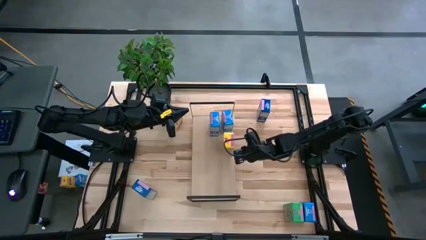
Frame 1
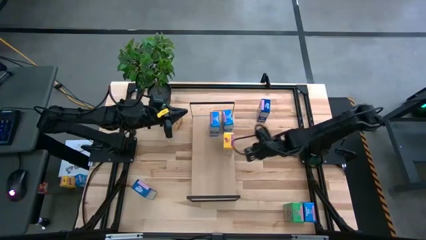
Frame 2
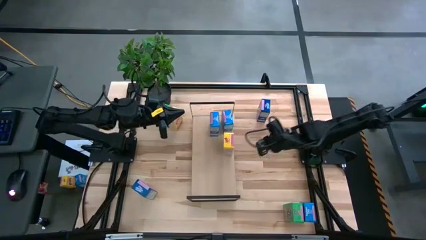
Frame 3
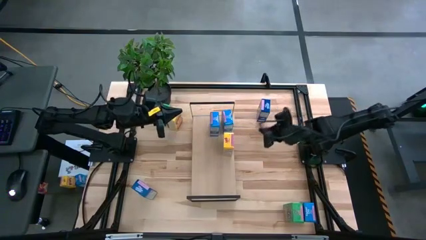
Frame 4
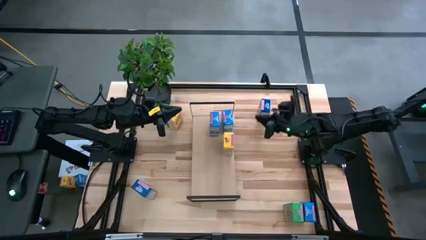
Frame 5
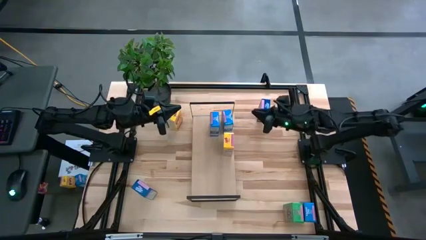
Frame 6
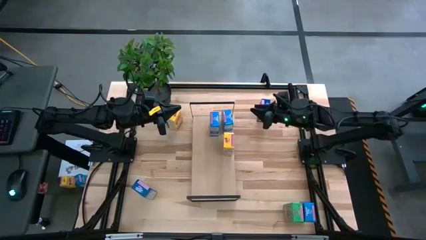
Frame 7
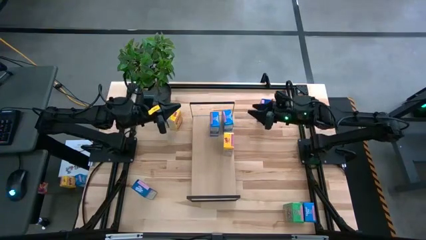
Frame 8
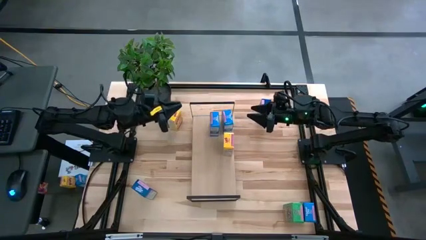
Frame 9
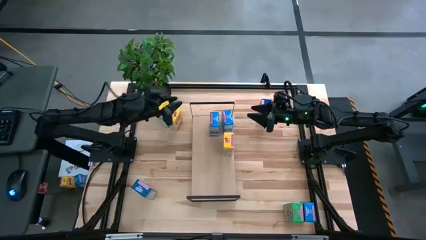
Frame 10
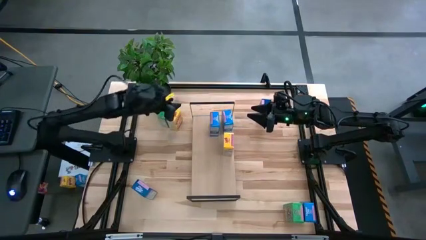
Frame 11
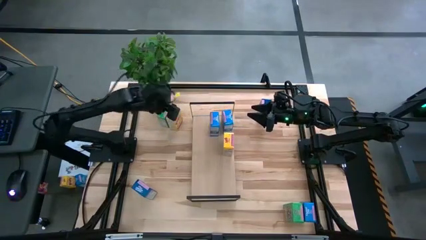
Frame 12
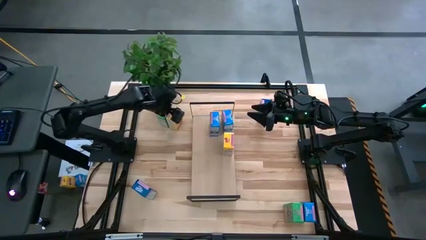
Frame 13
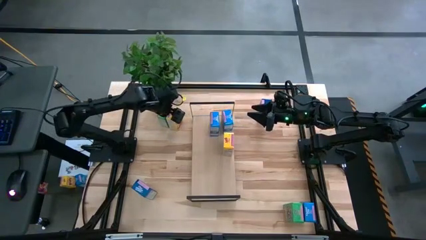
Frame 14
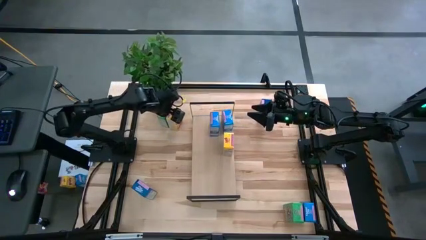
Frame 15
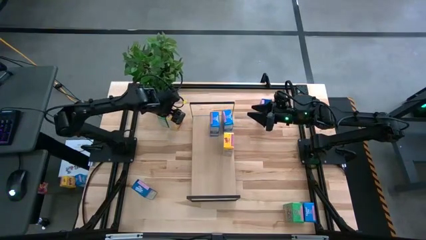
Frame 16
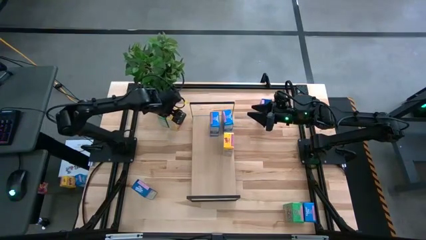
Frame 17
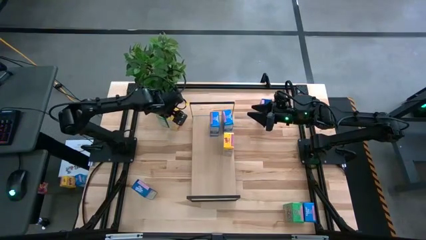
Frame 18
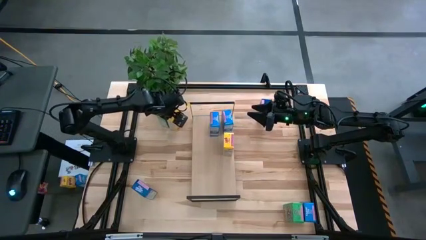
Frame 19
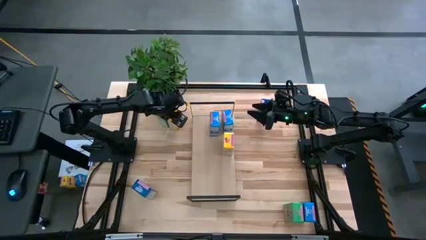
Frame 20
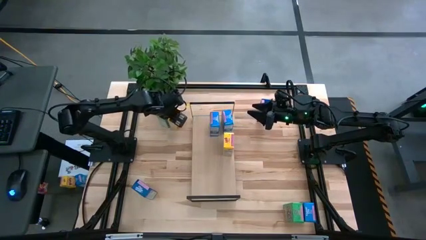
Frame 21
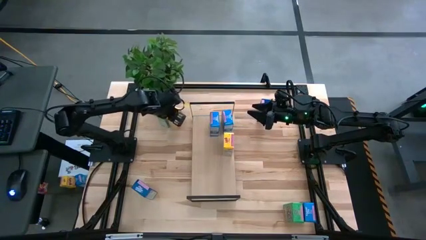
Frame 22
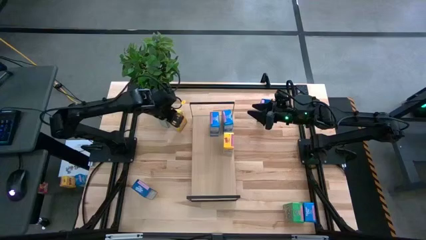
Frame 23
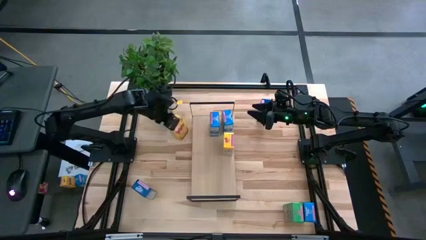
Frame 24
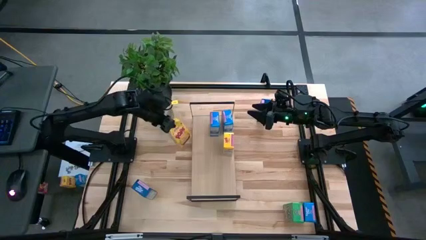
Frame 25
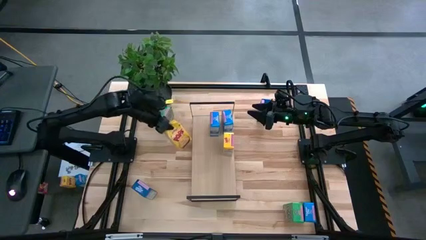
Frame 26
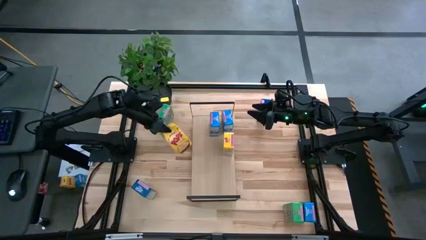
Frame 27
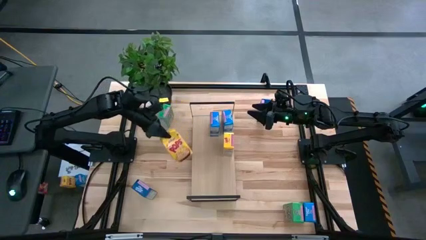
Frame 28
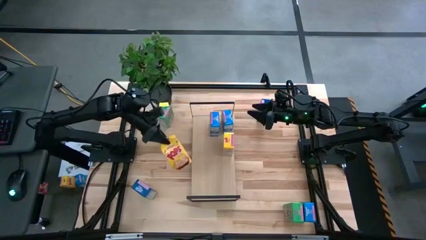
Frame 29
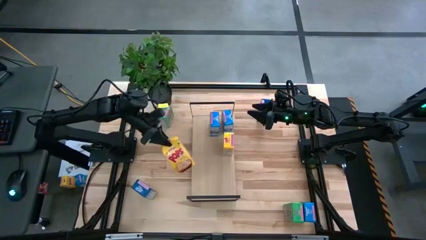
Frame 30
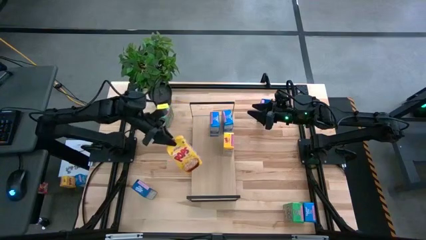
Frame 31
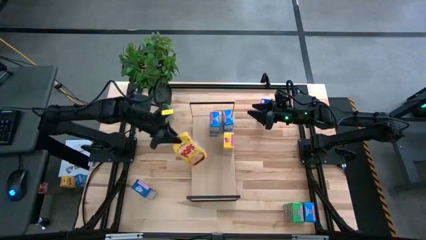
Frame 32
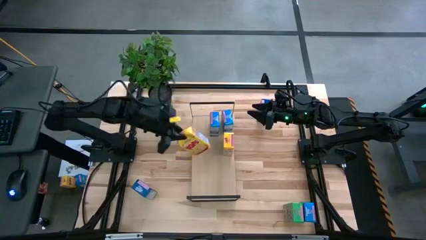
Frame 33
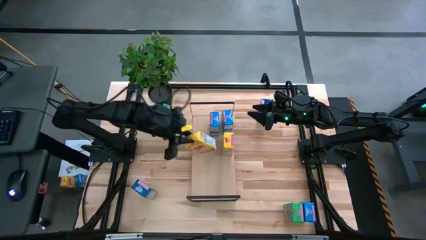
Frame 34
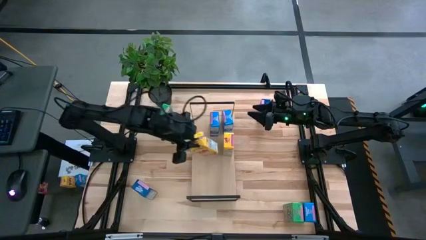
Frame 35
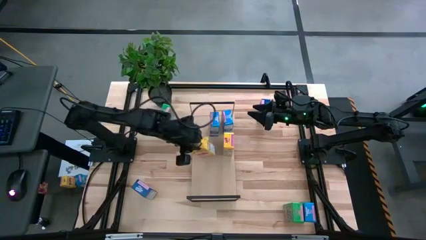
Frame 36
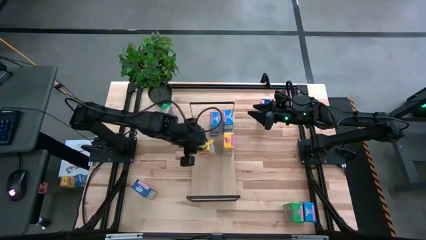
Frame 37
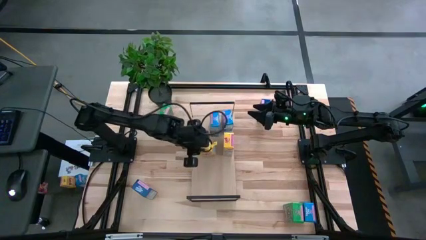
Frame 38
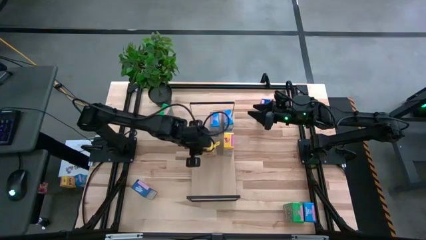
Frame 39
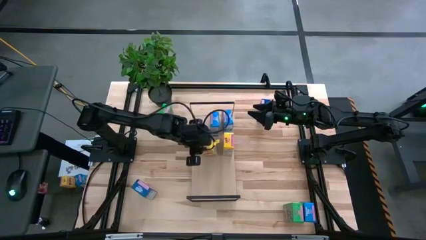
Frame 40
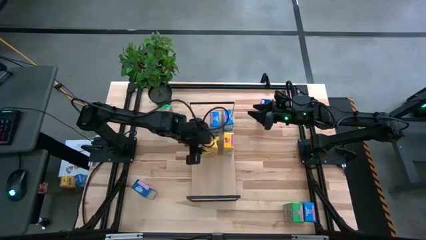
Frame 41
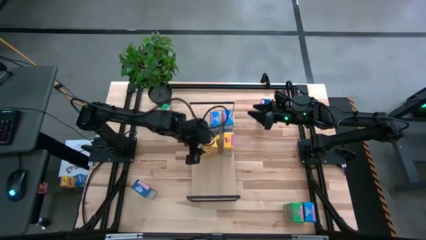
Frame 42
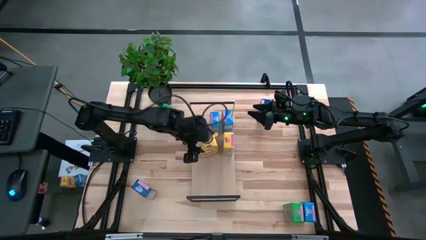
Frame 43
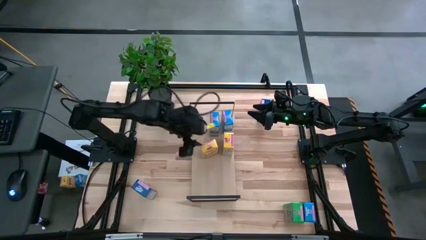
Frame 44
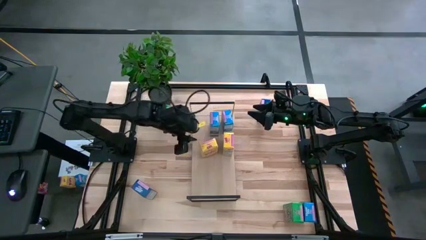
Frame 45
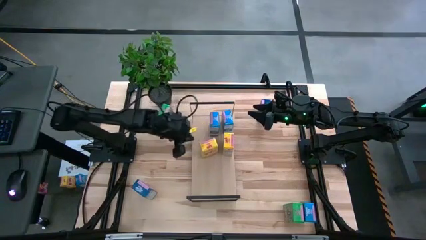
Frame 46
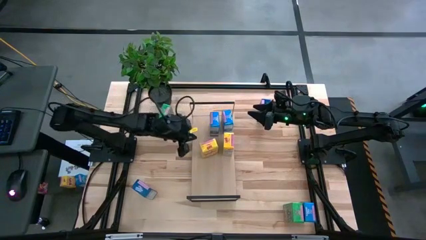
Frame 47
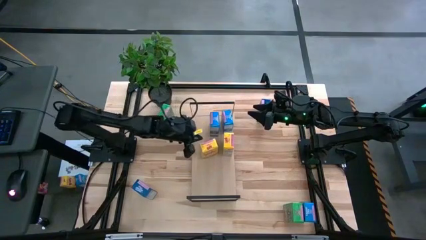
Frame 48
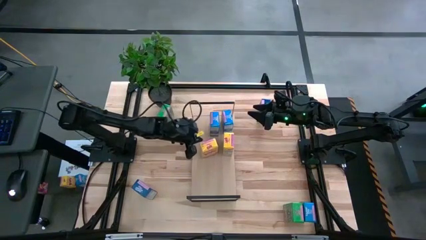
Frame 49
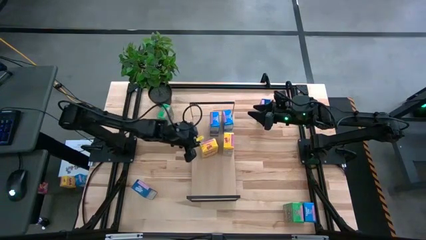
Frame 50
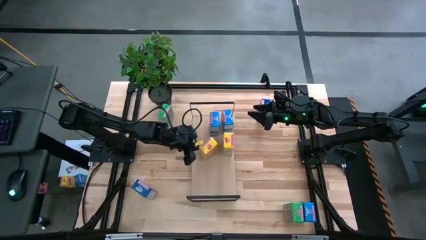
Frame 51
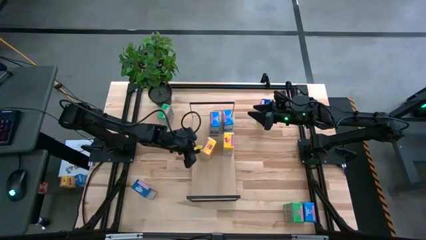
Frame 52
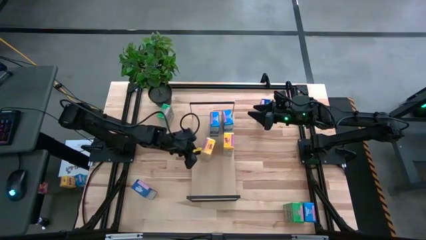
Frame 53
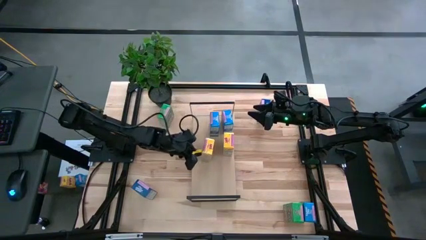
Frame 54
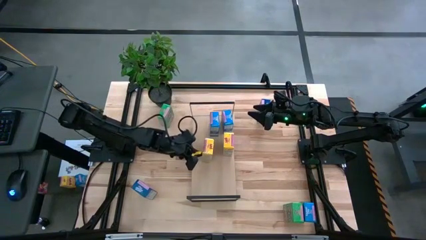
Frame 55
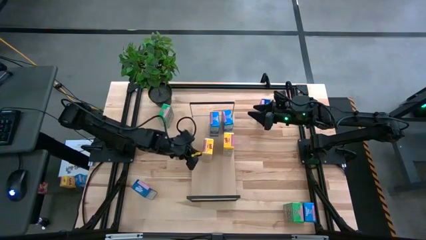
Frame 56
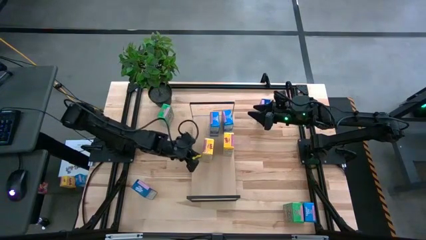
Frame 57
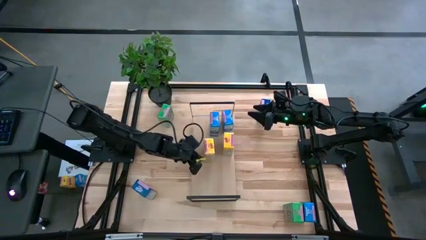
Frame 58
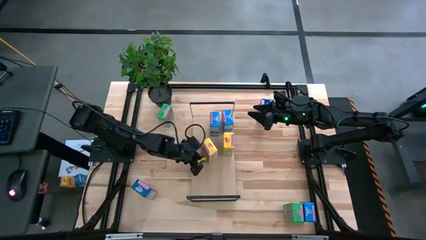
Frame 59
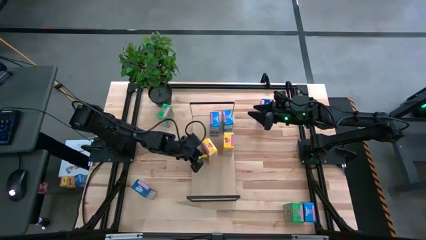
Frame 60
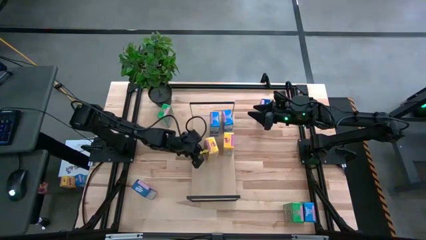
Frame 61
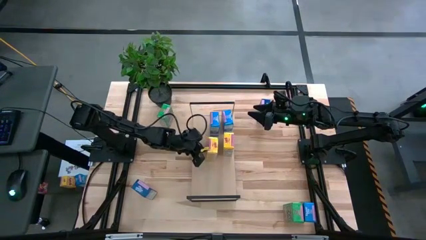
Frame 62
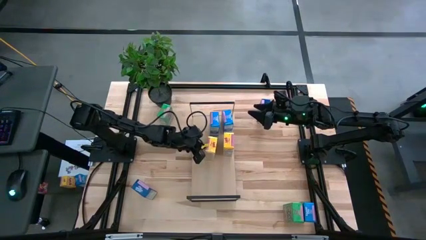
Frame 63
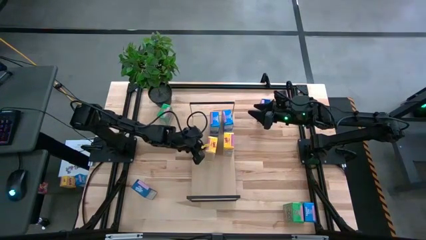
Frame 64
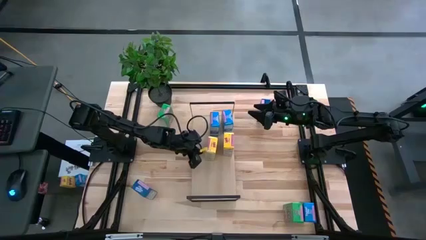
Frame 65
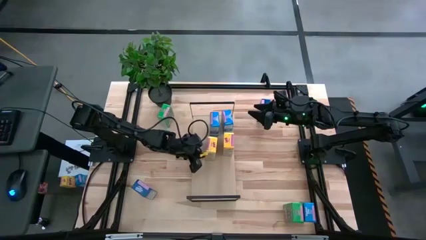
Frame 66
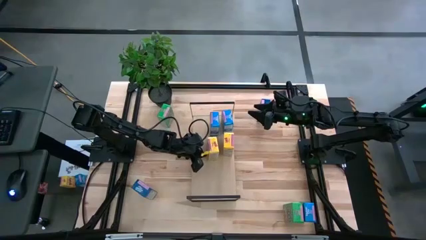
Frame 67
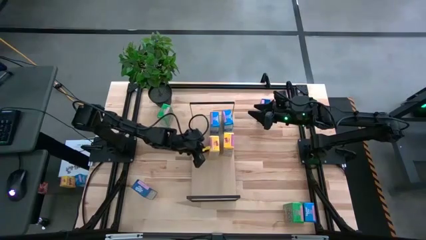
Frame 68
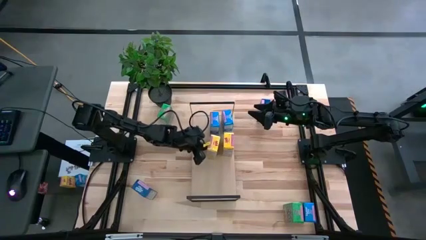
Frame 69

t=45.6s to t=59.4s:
Task: Stack cereal on shelf
Put the yellow cereal box on the shelf aligned with the other yellow cereal box

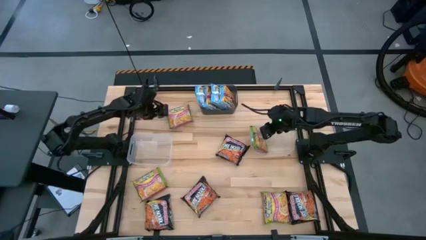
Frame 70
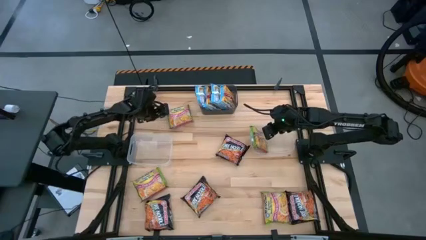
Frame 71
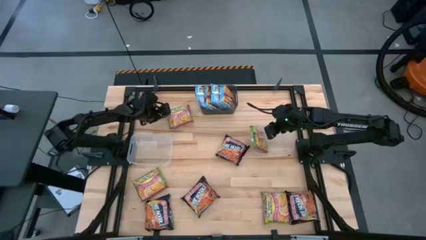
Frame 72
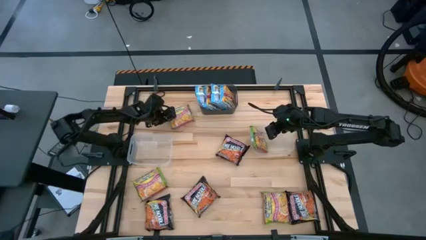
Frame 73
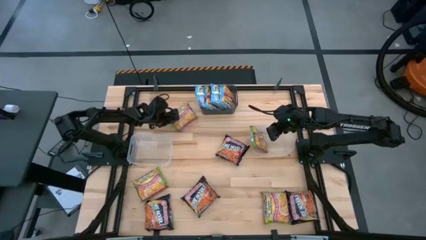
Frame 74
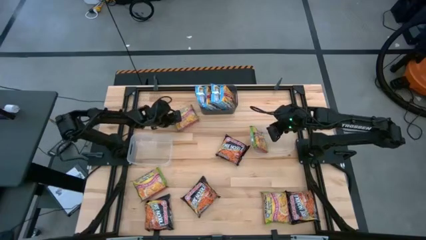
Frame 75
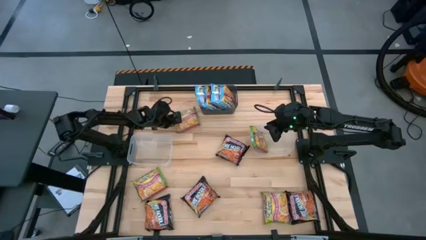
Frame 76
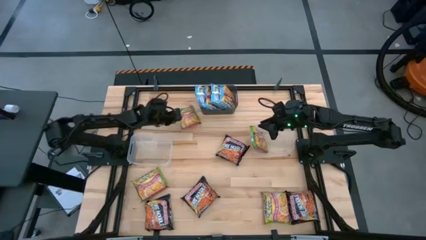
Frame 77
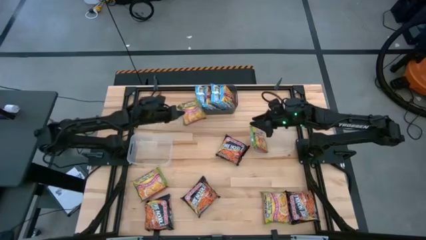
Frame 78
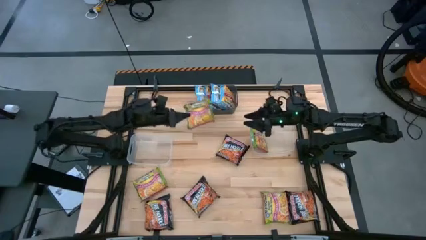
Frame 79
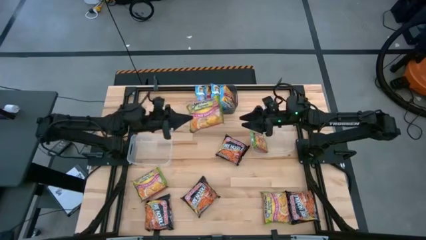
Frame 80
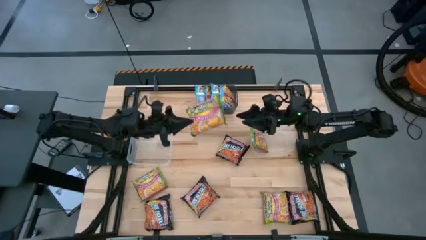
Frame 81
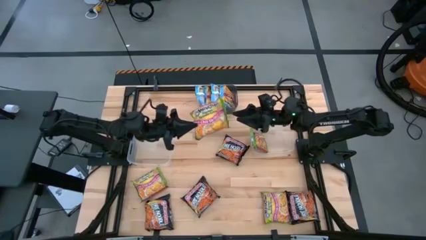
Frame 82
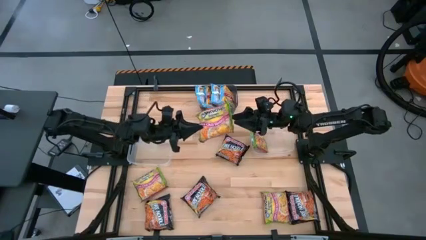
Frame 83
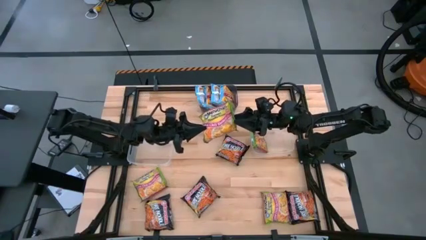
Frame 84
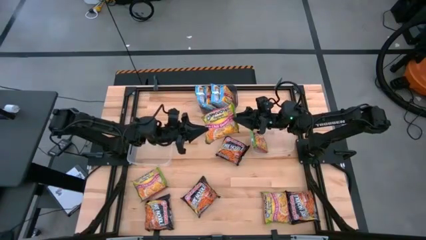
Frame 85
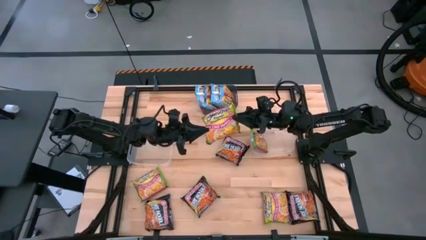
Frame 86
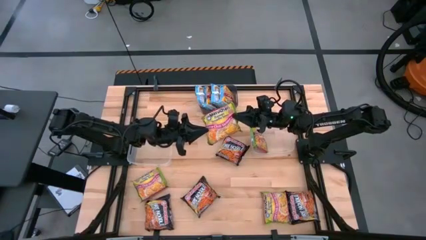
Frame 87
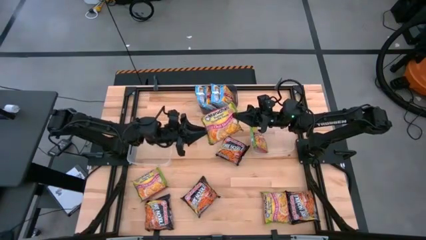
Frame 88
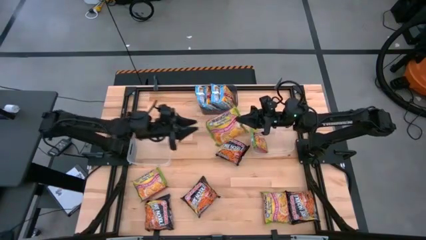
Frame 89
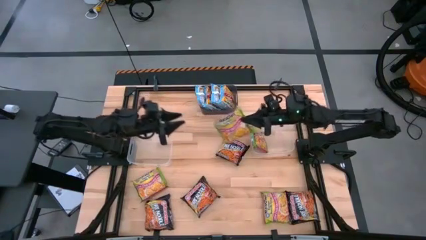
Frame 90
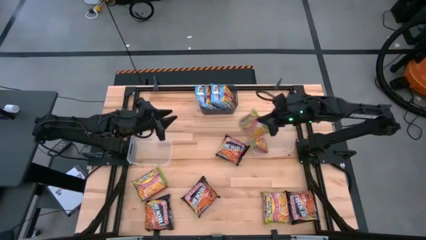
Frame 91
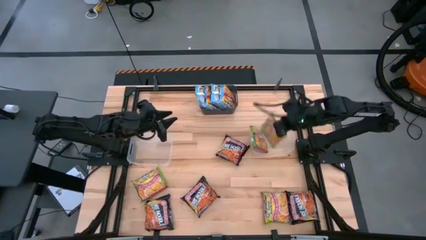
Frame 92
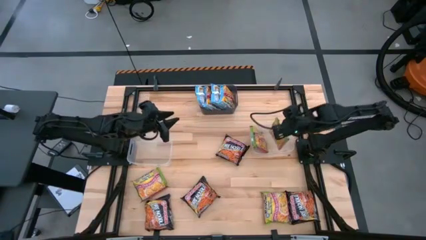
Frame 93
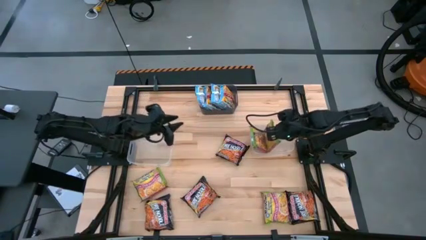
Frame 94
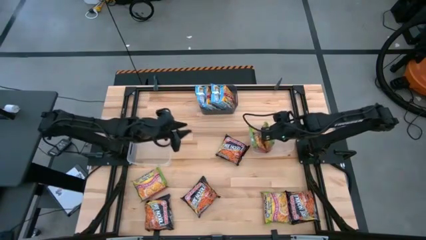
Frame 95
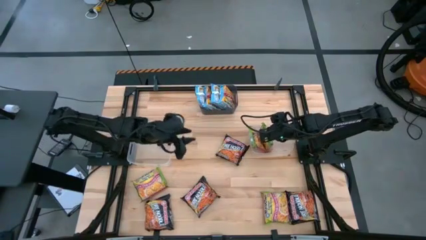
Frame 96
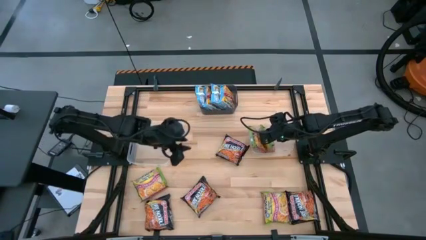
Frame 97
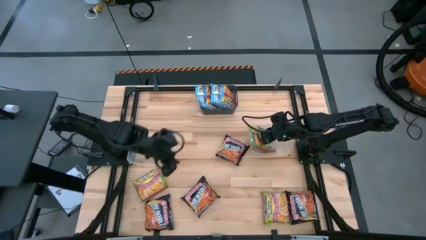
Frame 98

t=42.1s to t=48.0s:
Task: Sort Maruchan noodles
Put the green noodle pack into the right transparent bin
